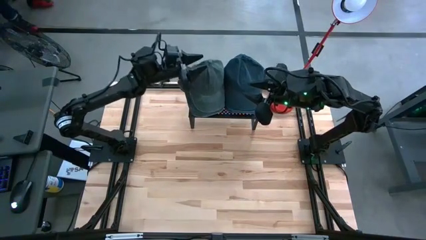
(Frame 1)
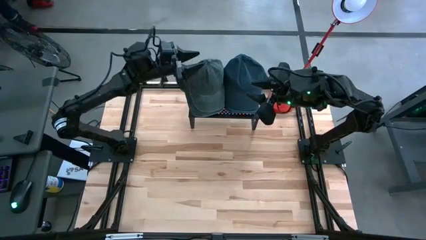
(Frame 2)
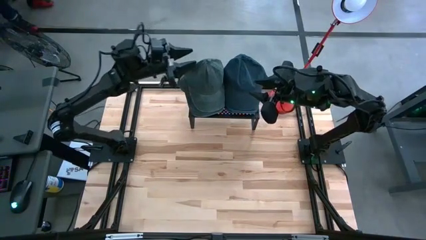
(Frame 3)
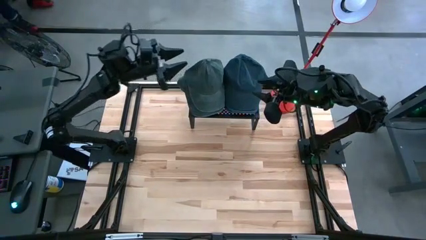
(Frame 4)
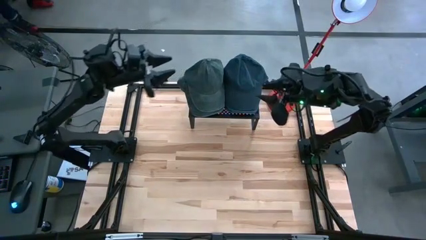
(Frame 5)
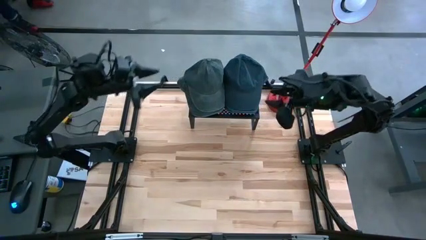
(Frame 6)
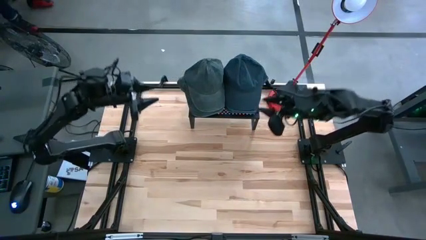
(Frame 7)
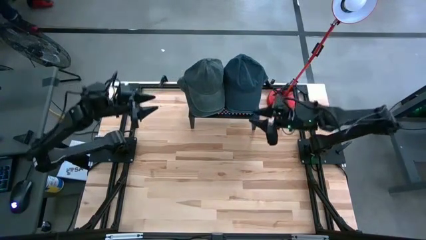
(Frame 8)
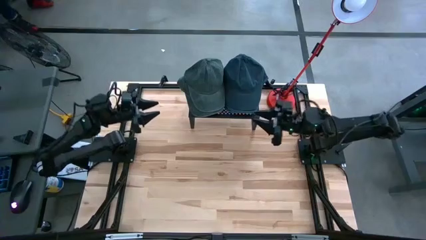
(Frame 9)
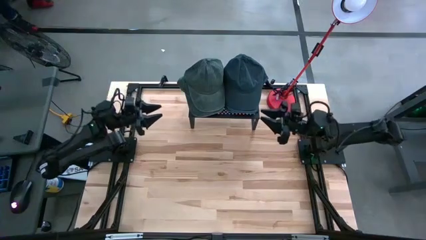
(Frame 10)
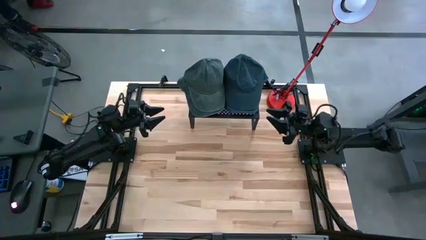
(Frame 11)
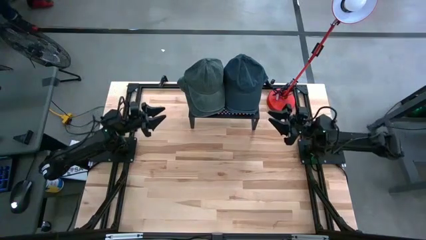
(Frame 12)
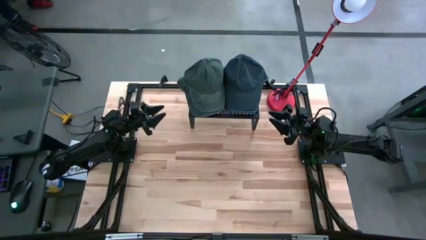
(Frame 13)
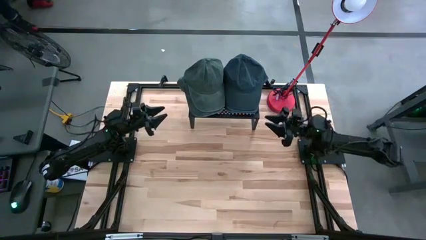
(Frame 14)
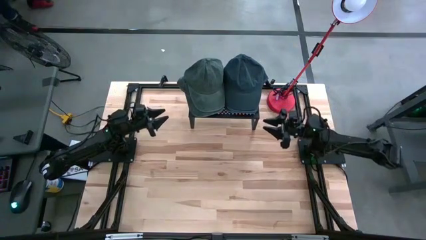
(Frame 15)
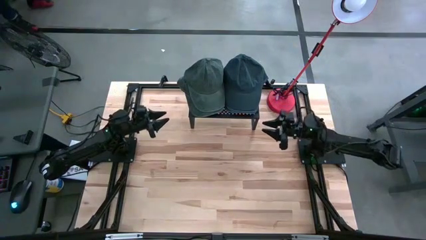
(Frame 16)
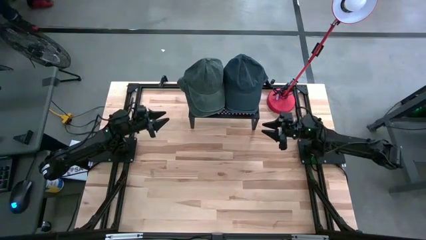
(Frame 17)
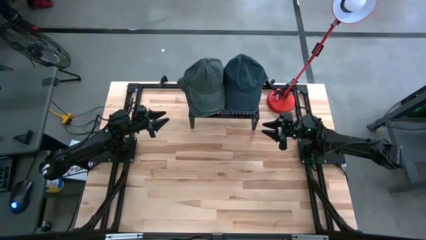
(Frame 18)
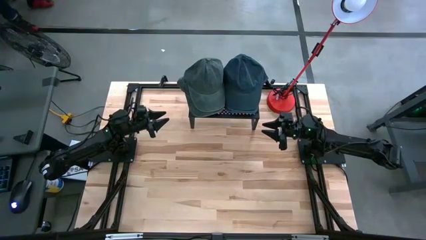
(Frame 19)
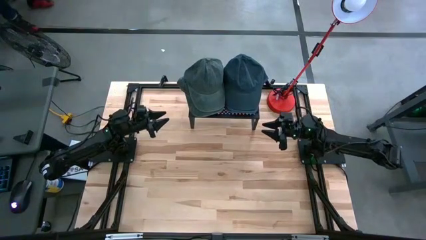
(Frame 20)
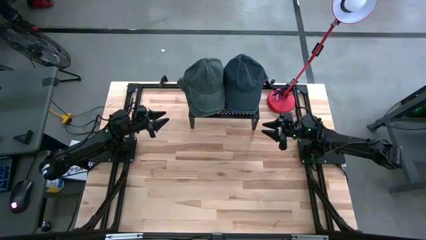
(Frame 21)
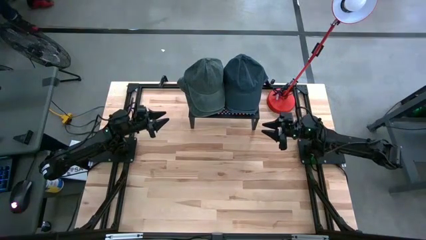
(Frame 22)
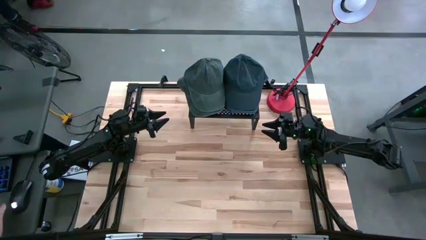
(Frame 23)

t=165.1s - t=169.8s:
Task: Pick & Place hat
Return to Home Position

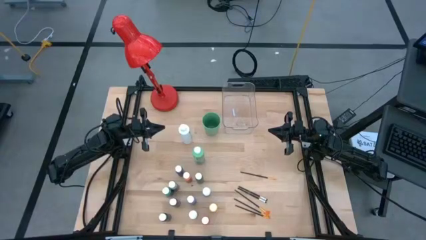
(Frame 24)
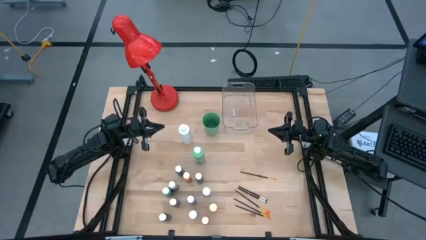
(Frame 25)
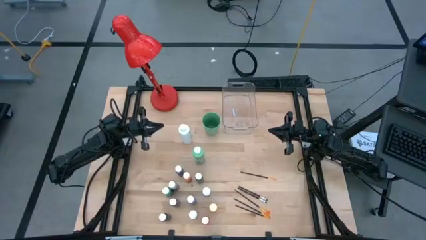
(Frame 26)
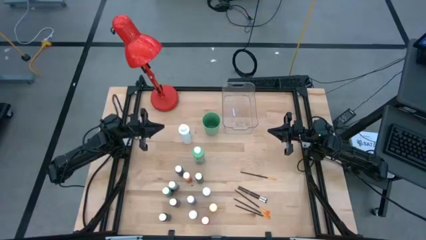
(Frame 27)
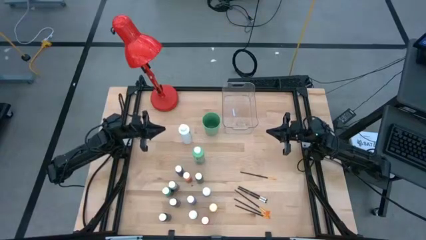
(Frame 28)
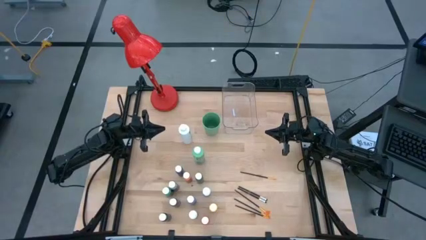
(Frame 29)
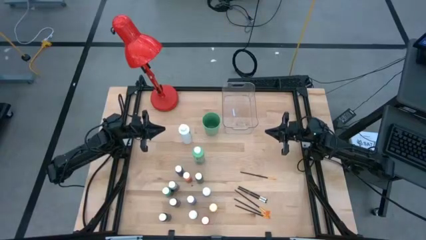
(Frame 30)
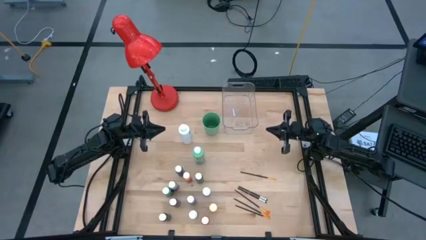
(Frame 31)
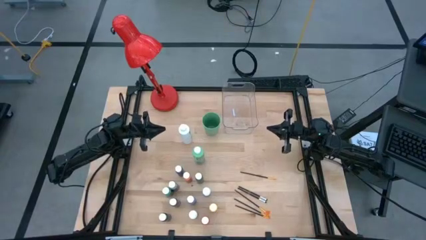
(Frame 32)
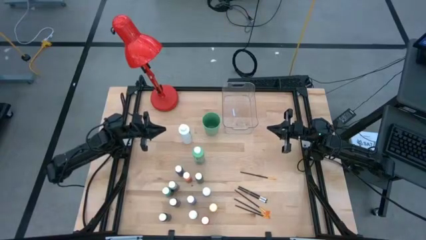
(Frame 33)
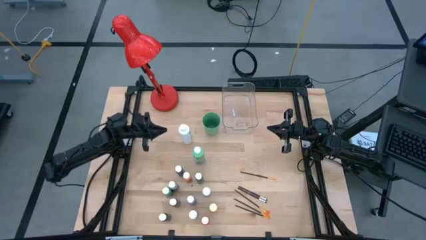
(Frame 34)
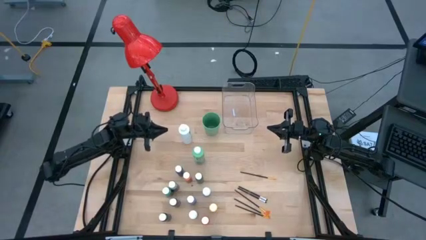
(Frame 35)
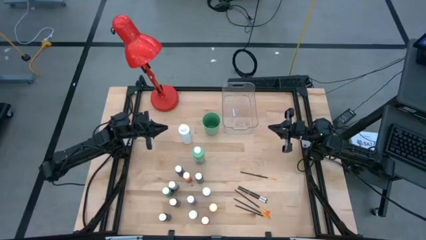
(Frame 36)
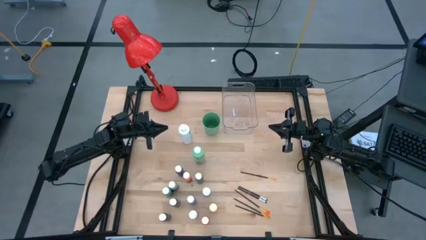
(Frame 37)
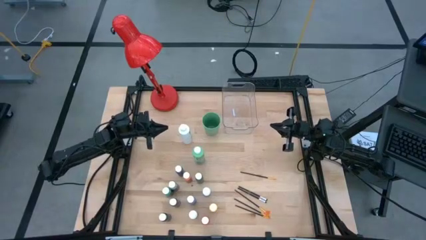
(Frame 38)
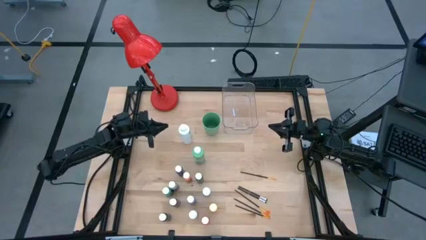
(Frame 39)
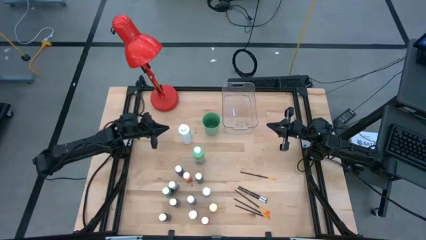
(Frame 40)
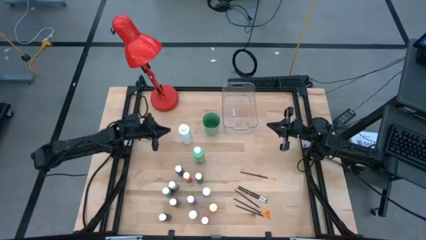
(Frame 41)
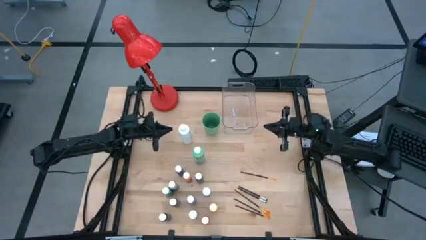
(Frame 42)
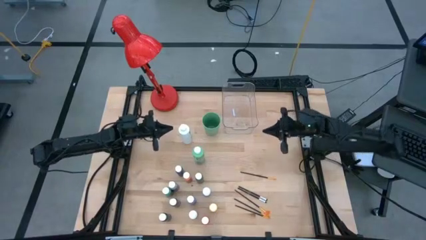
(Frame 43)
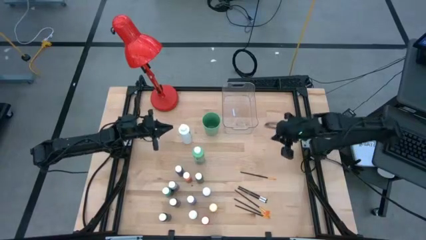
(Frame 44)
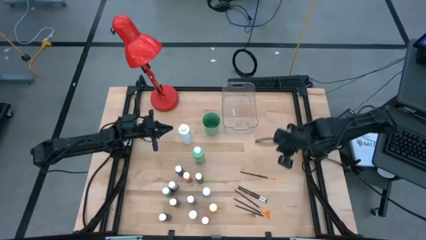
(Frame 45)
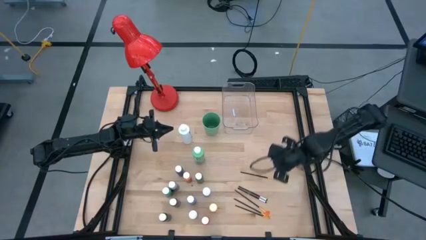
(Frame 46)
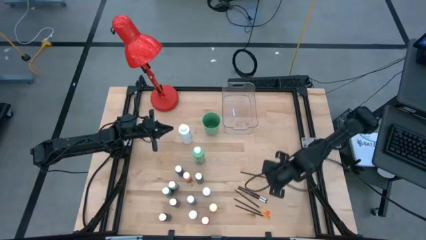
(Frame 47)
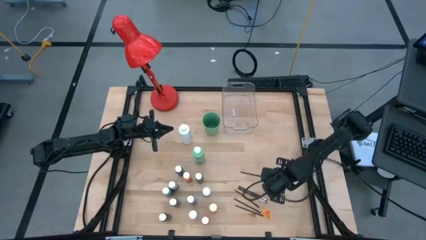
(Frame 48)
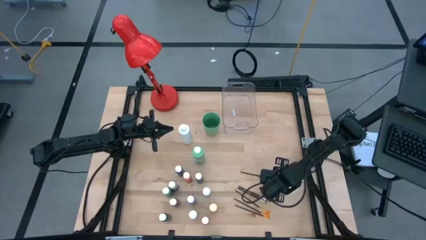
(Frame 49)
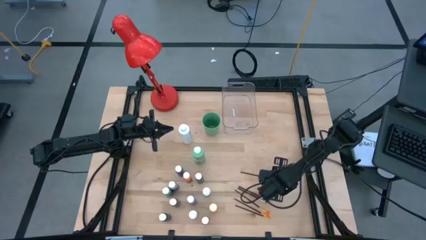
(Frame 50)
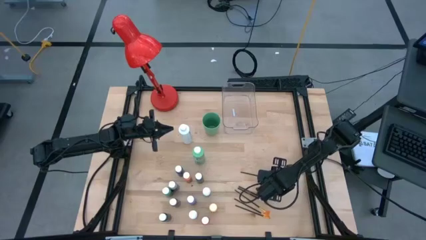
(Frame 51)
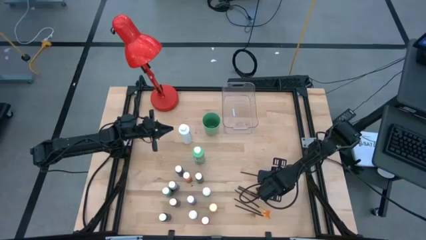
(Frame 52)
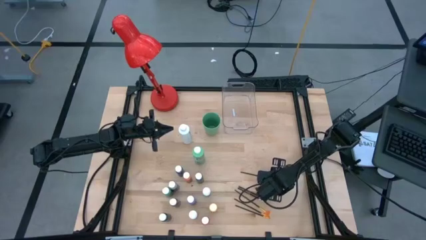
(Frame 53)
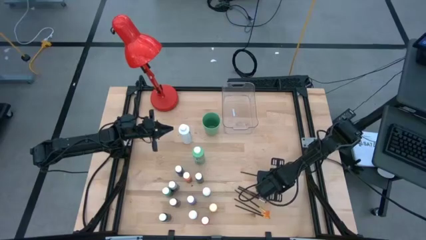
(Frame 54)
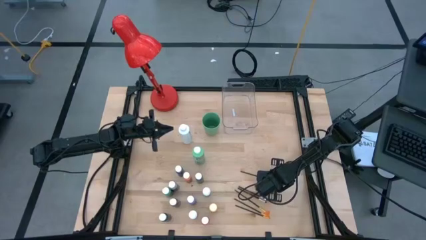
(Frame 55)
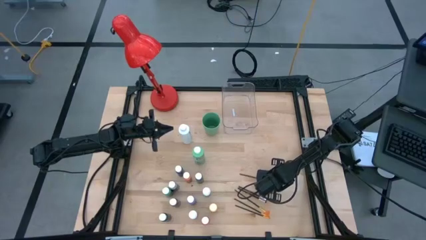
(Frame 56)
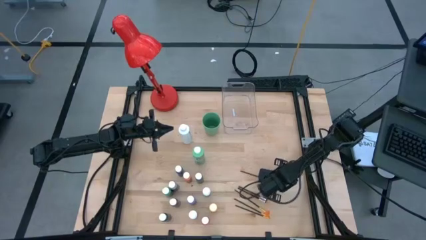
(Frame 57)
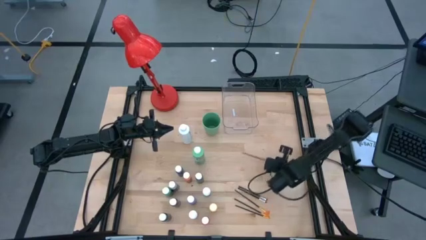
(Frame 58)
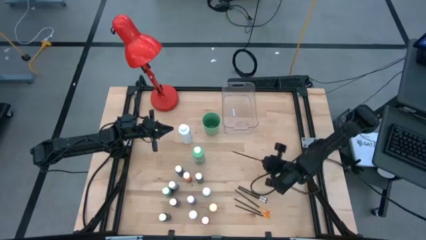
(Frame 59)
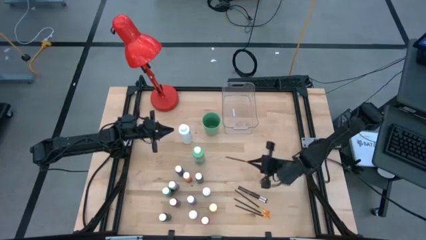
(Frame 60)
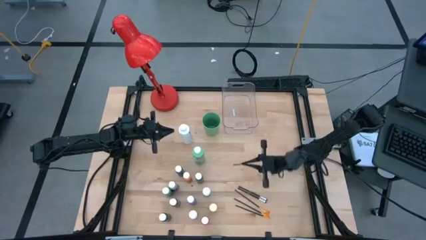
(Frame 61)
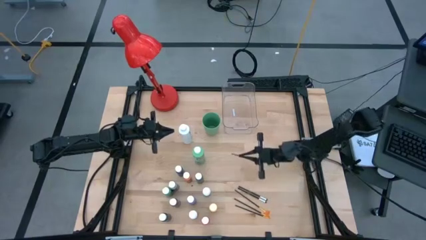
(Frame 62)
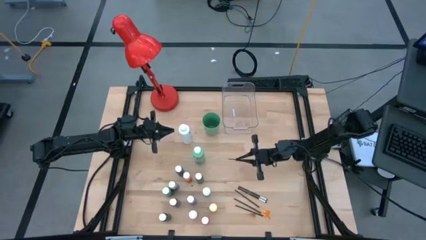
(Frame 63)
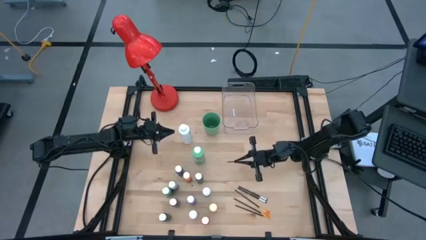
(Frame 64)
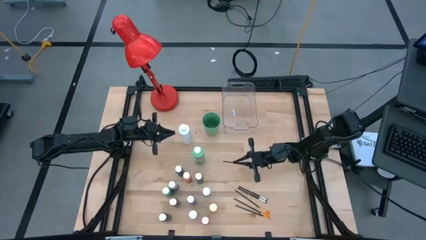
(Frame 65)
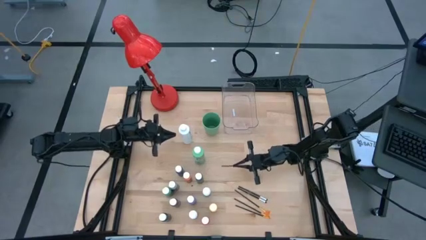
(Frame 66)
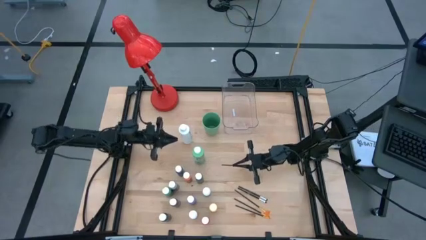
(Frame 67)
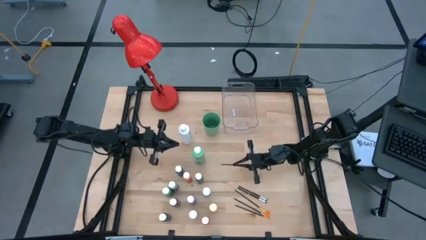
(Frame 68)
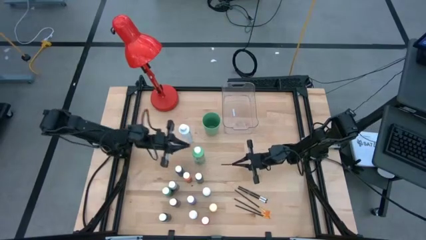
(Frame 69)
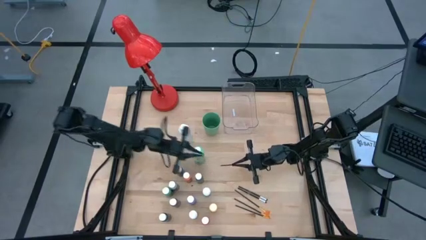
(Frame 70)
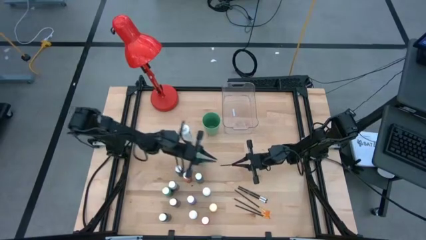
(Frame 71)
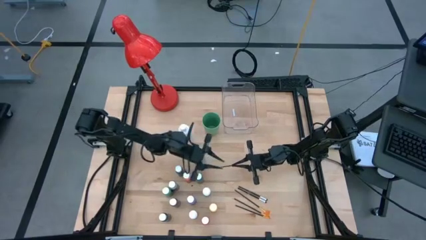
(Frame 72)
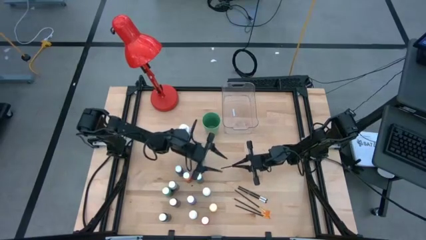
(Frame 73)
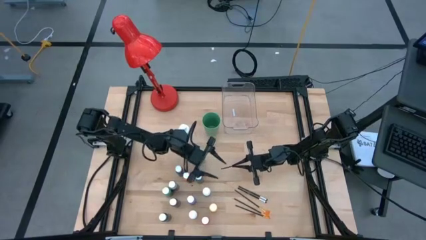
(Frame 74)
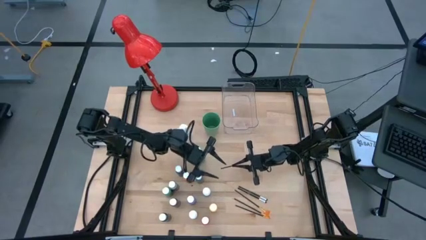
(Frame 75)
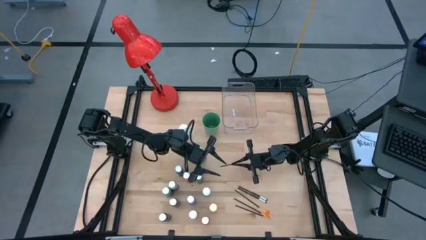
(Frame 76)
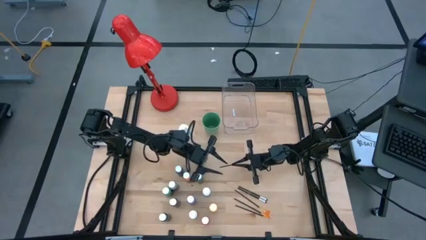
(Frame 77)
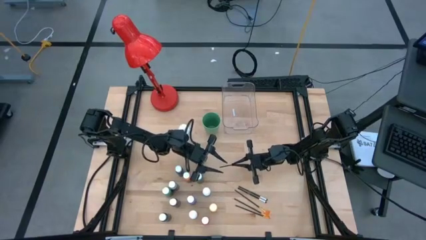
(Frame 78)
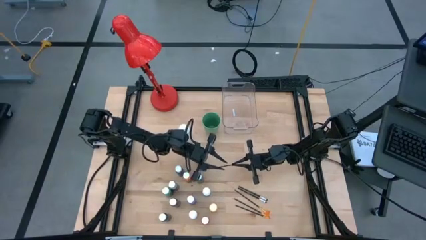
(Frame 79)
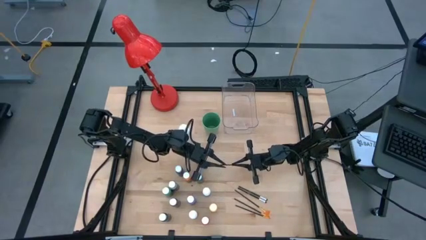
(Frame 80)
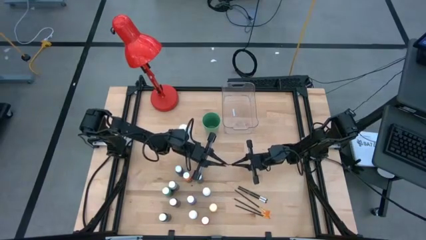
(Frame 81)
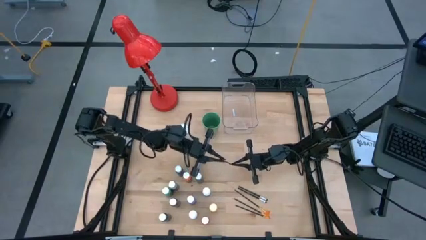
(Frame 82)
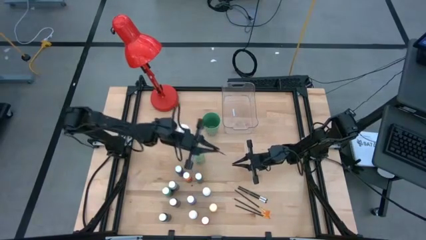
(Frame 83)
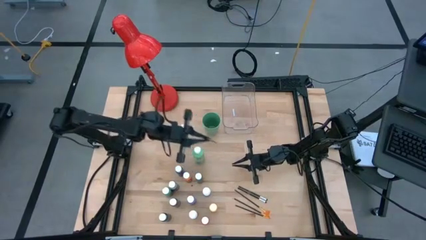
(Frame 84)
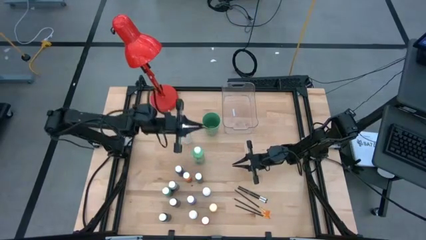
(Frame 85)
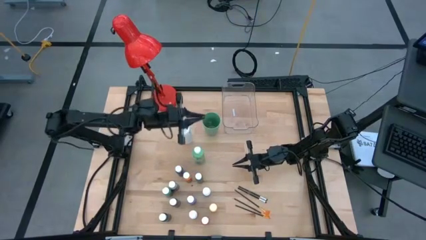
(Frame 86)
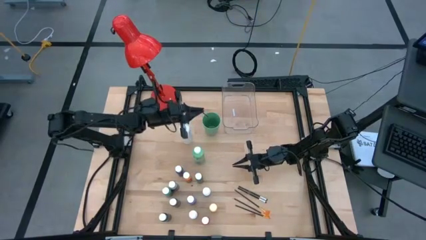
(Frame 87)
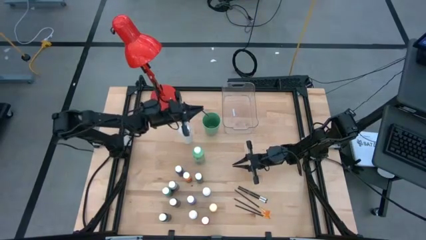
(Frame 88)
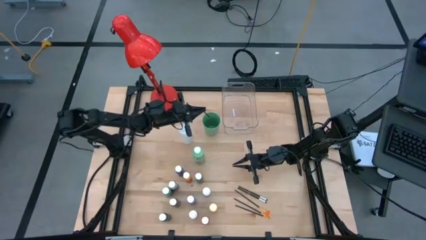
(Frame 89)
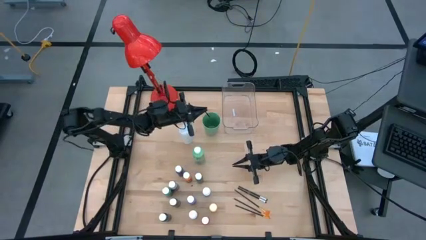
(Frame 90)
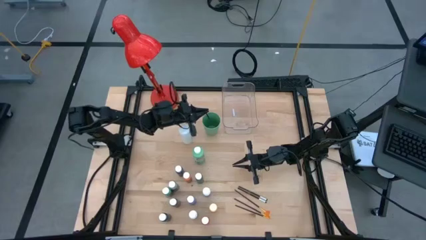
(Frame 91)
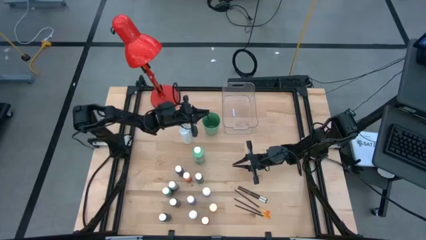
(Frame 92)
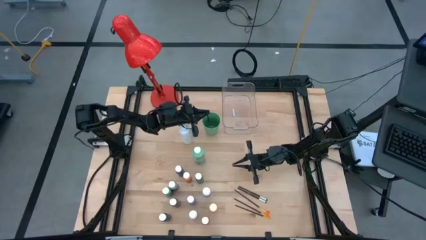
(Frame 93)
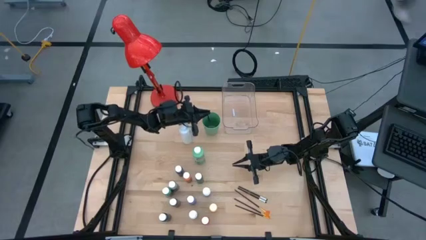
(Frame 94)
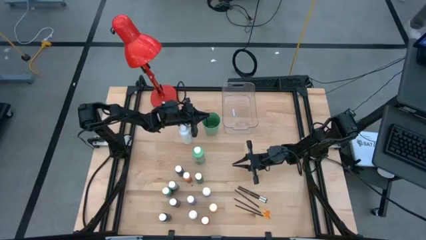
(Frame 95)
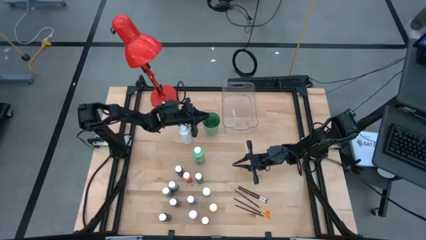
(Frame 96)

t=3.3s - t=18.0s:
Task: Pick & Place Paint Supplies
Put the orange paint brush into the green cup
